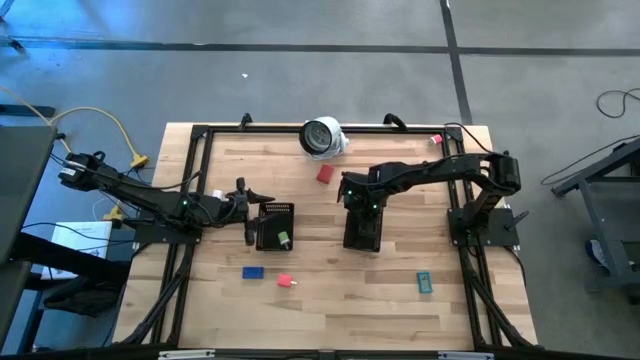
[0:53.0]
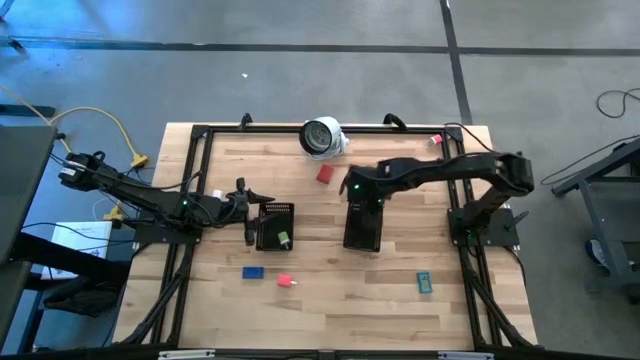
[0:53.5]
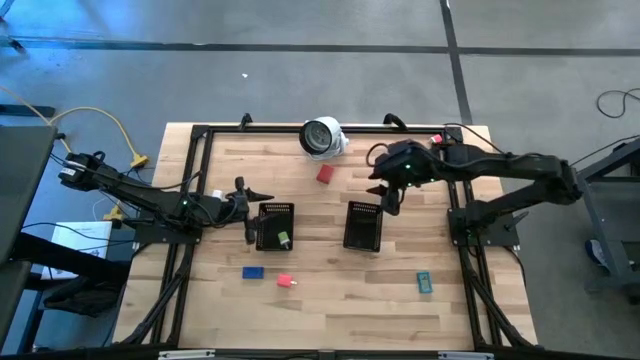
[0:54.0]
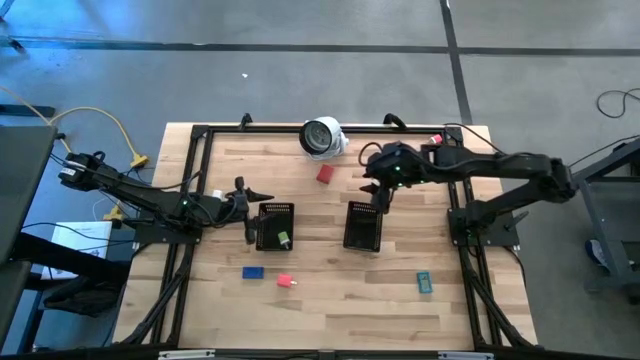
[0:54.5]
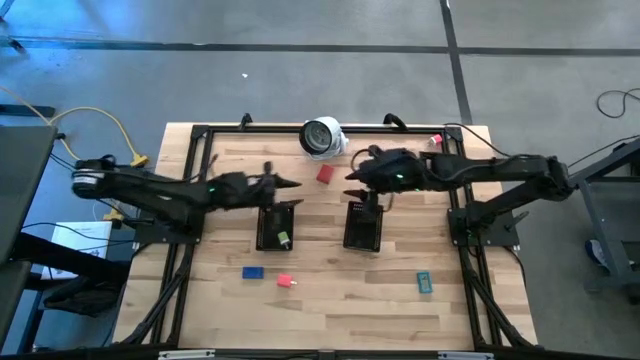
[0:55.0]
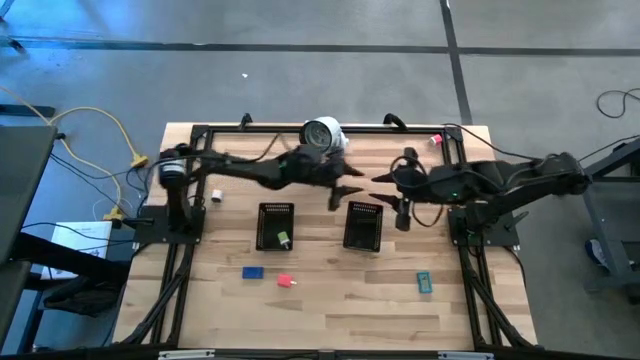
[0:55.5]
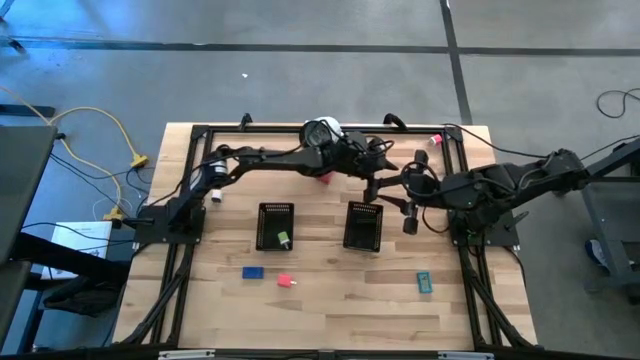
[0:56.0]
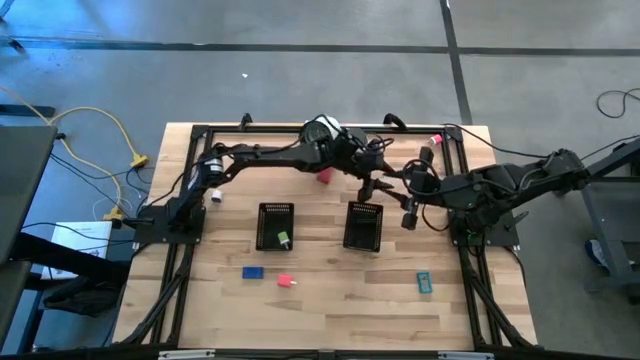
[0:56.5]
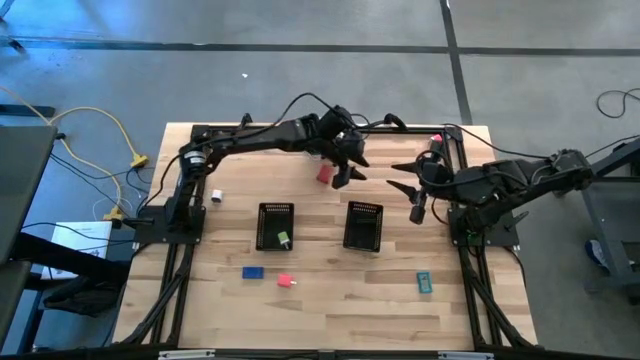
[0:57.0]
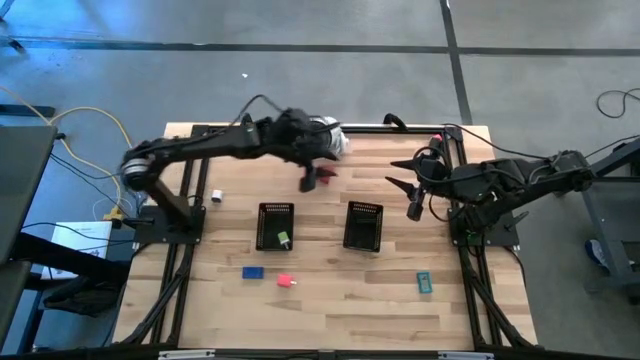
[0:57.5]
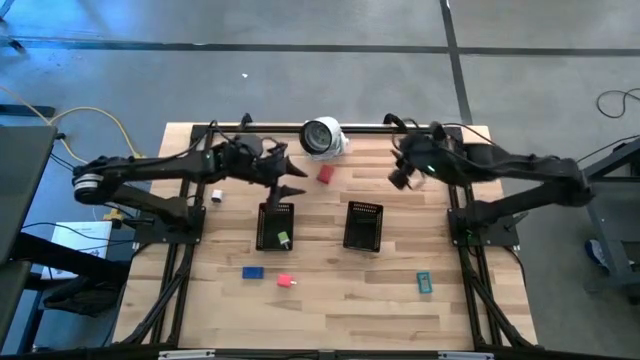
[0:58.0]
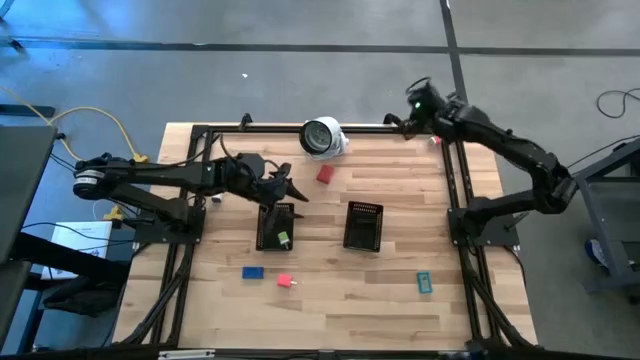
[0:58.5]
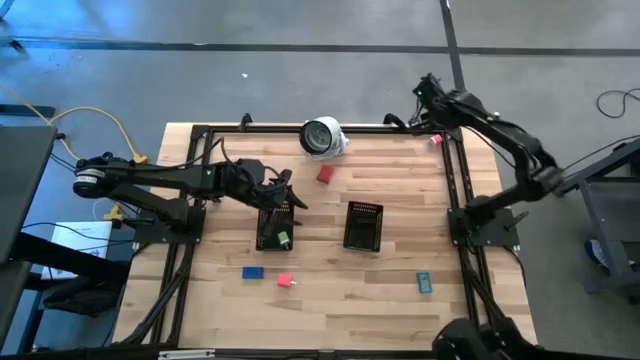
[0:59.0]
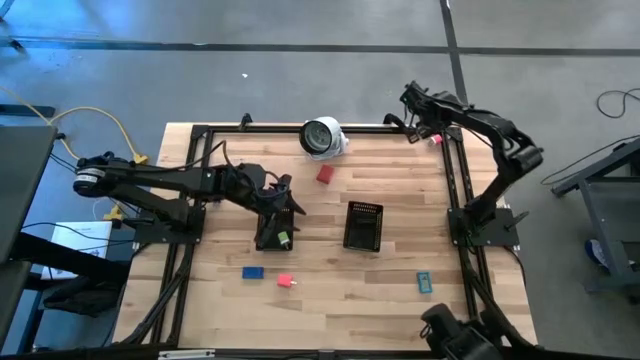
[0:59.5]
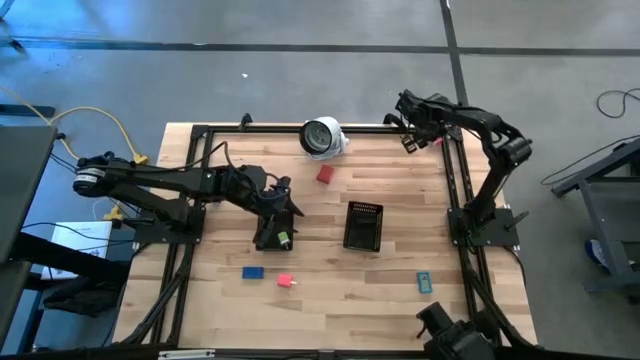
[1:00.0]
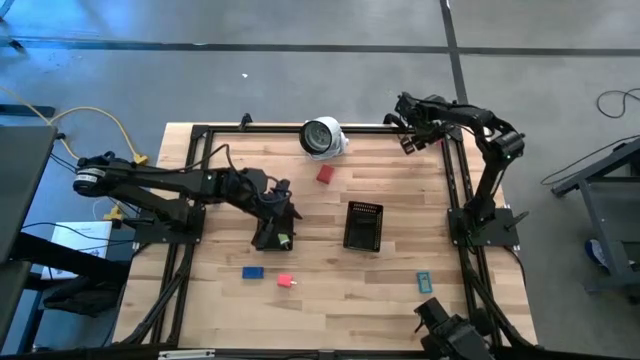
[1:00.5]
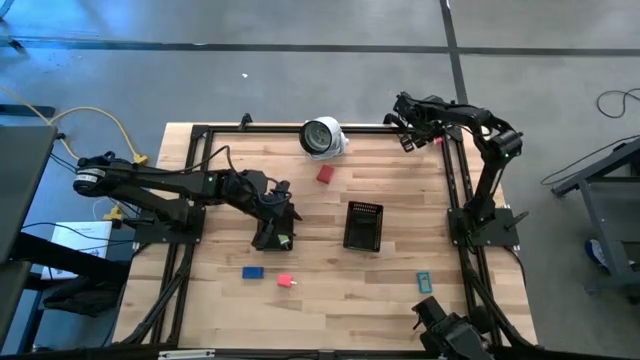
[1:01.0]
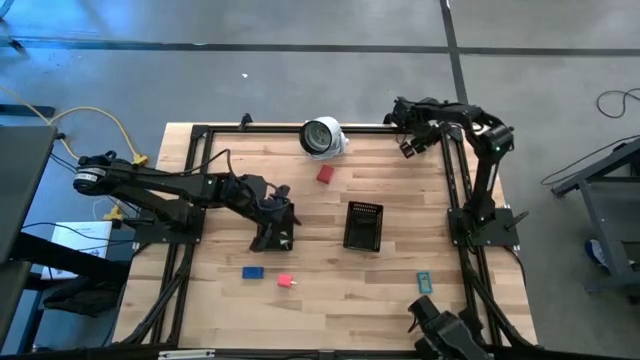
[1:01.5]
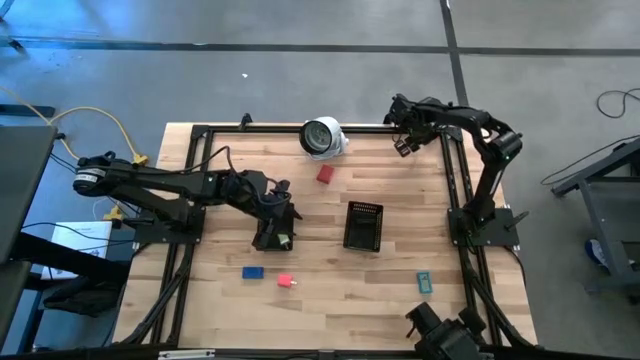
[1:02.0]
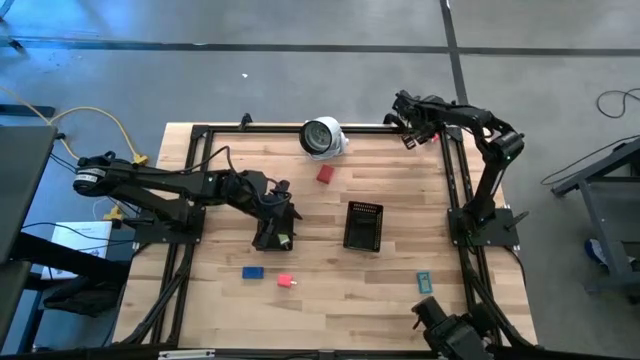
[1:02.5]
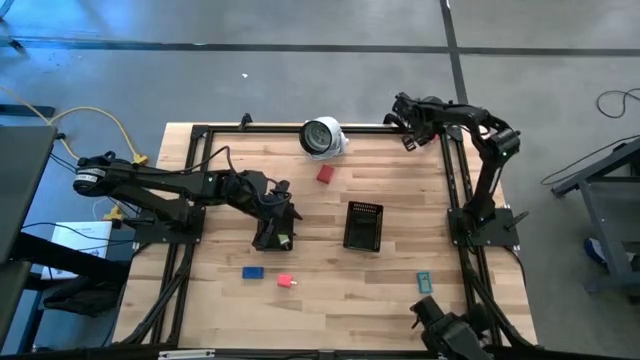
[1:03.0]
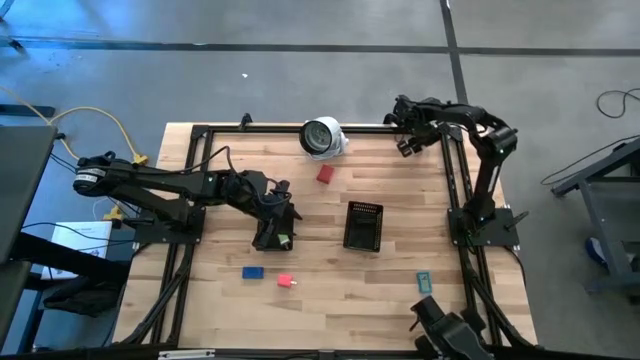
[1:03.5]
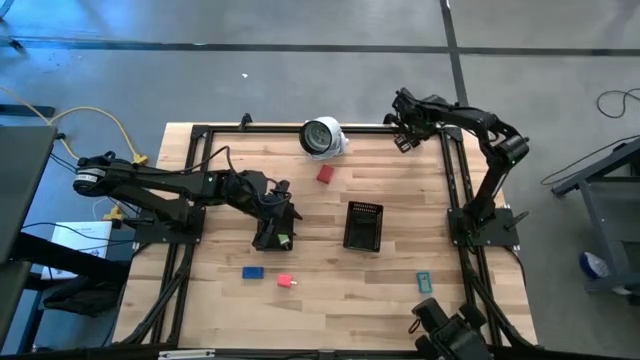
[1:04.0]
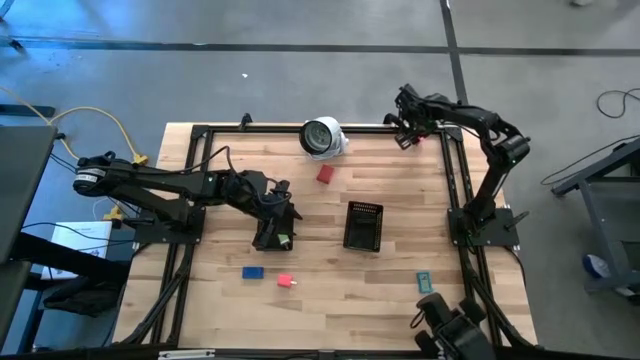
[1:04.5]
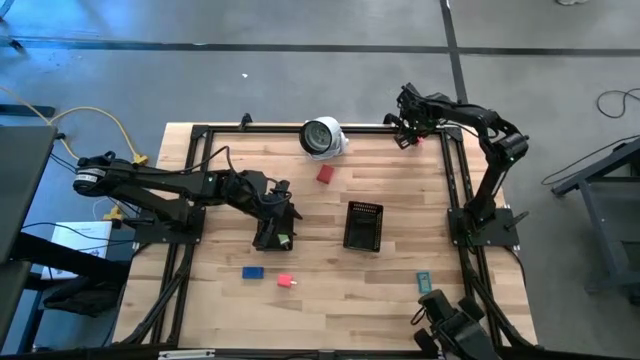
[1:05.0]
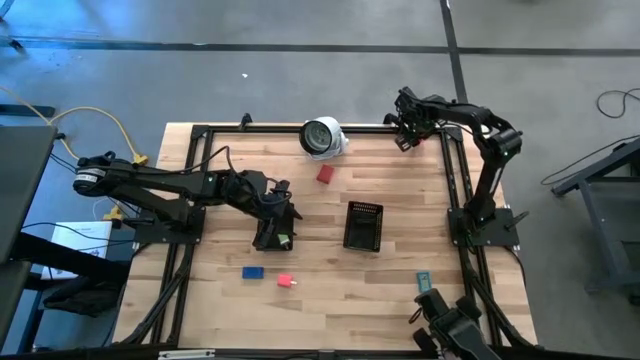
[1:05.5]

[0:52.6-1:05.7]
Task: Pick & Place Office items
Put the pink white charger adapter into the left black bin

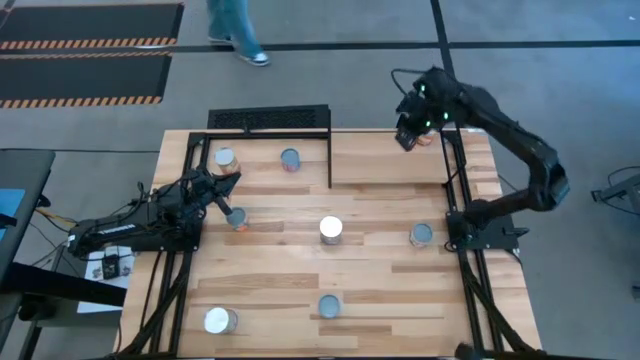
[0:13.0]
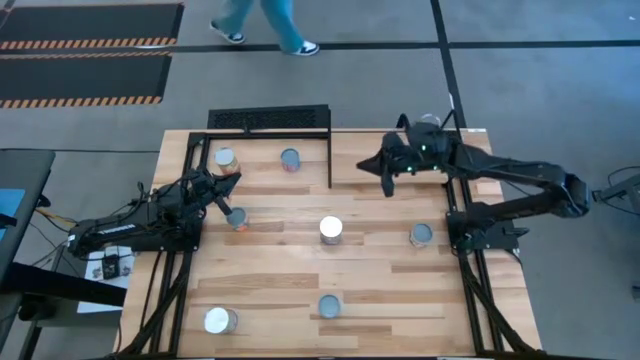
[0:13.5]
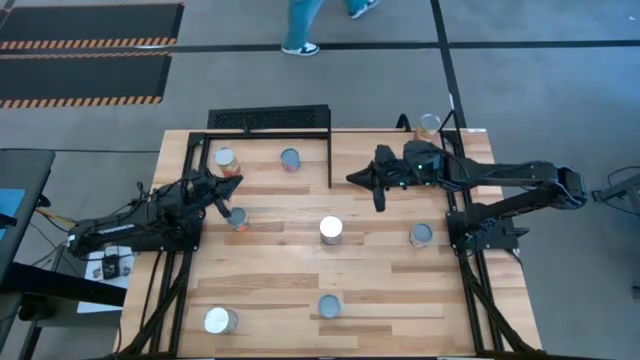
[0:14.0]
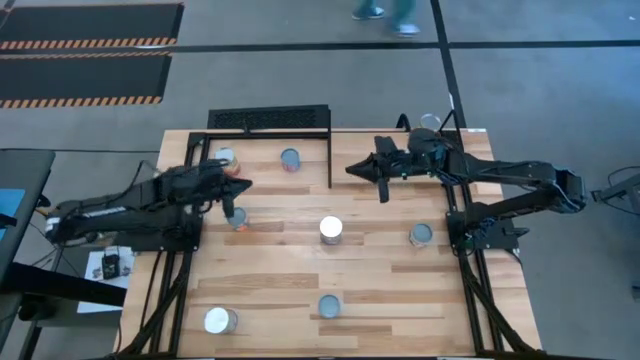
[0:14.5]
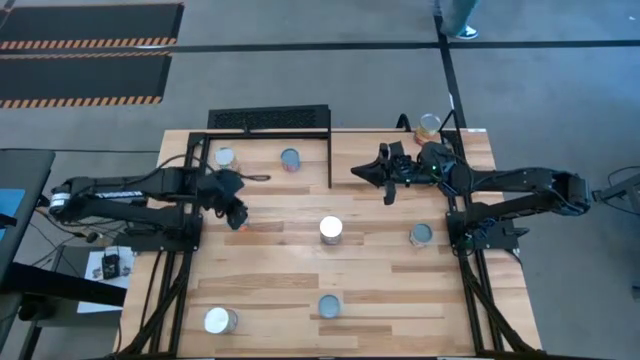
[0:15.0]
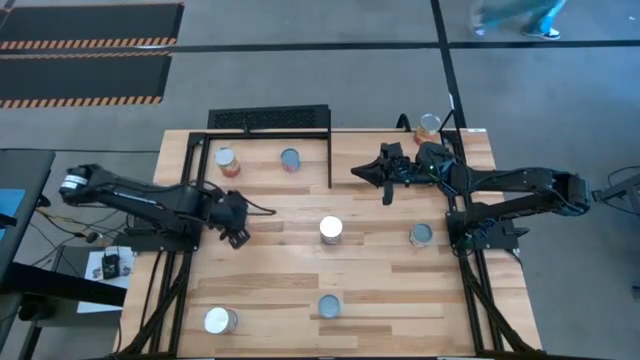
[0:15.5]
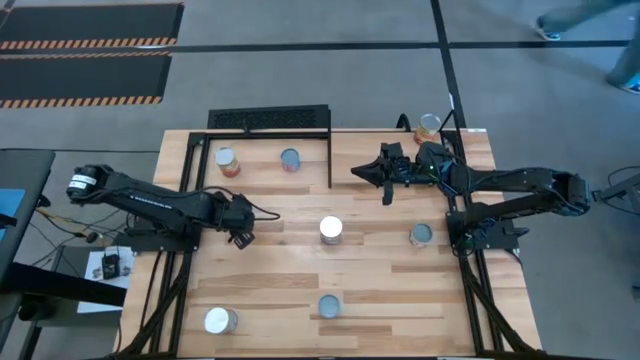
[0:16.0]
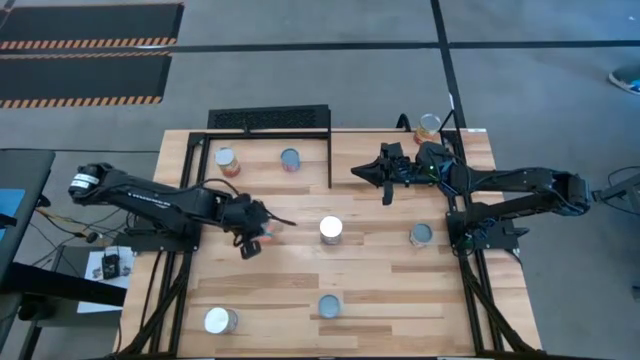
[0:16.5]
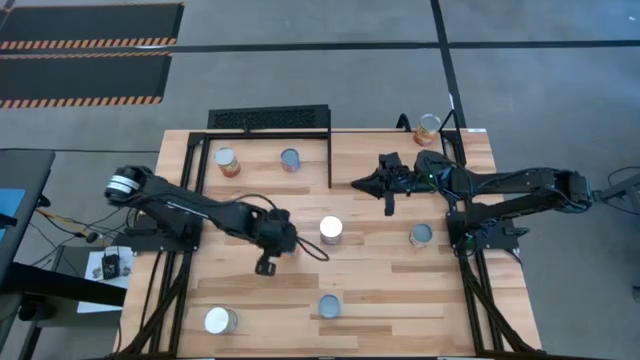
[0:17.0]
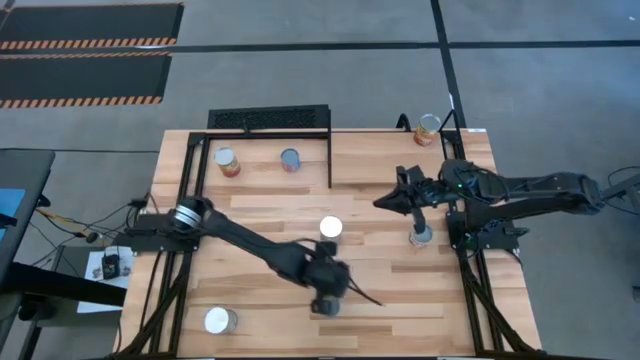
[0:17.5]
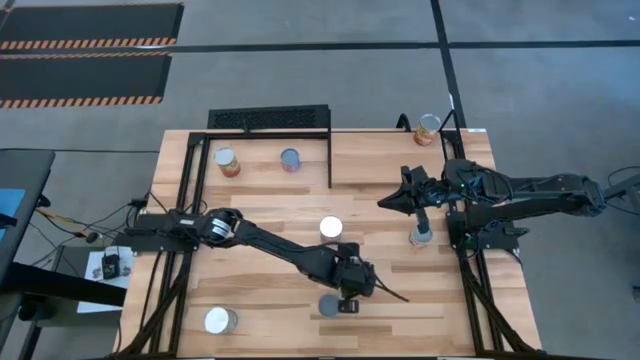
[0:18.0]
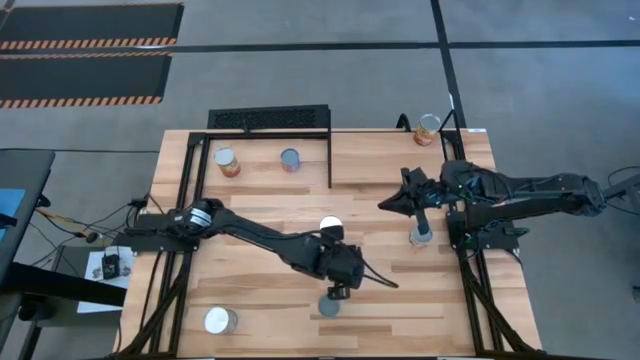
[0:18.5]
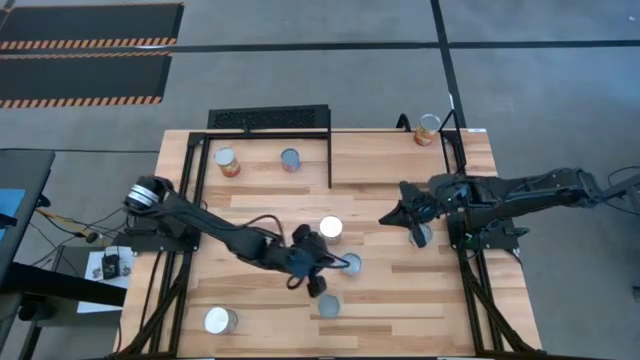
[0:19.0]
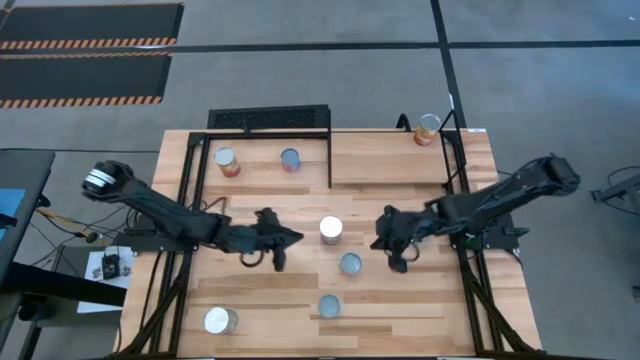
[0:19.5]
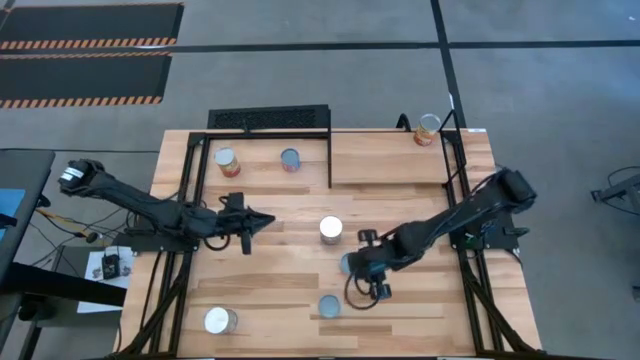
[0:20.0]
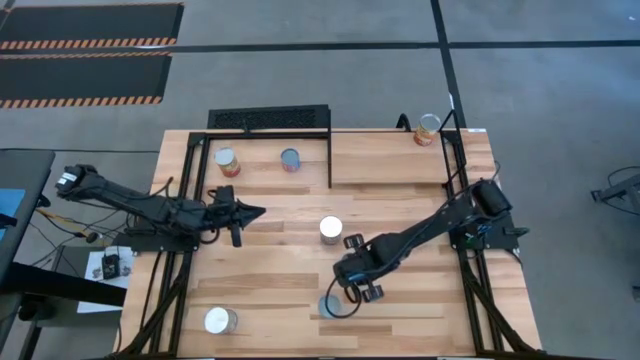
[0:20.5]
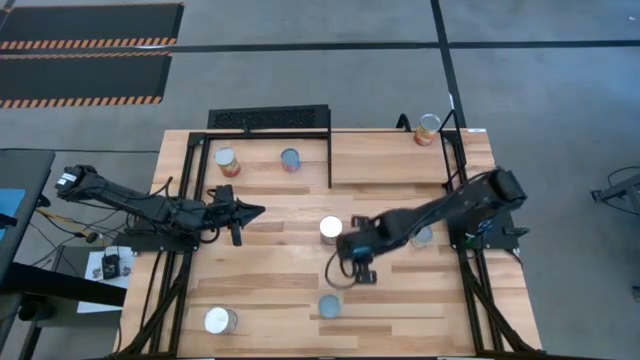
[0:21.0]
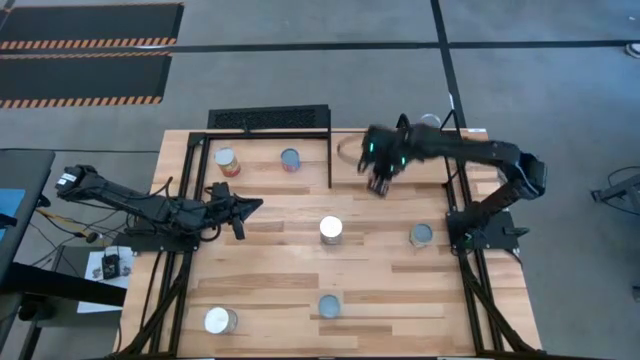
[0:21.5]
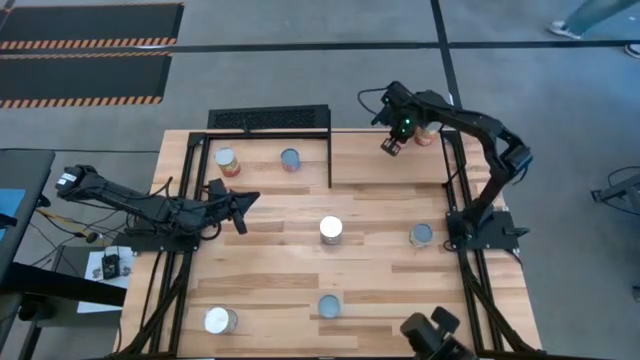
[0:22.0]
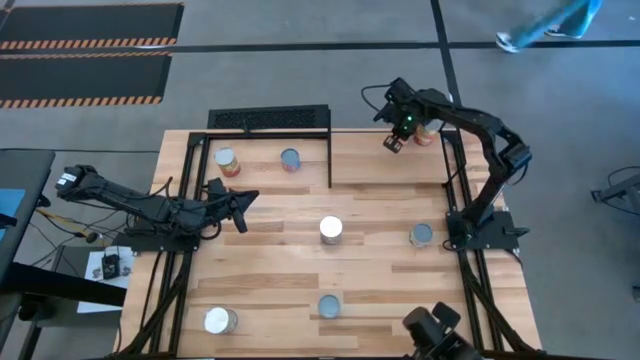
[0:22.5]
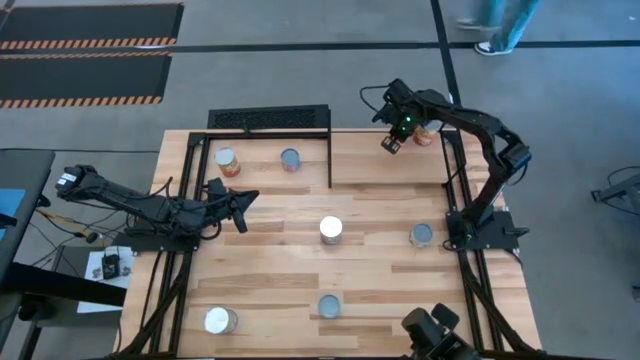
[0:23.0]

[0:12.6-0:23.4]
Task: Pick and place cans onto a shelf
Put the canned orange on the shelf
